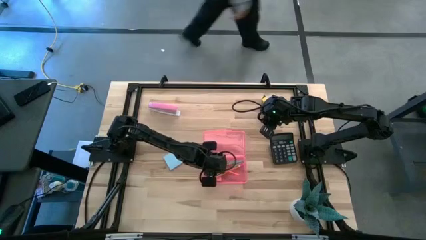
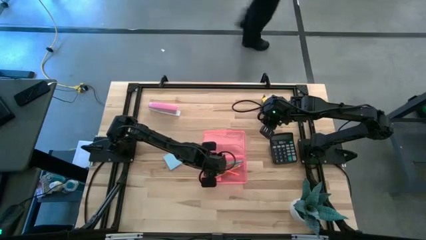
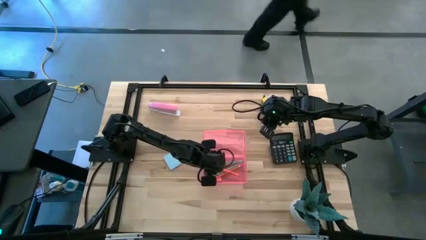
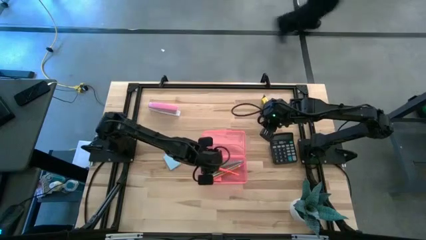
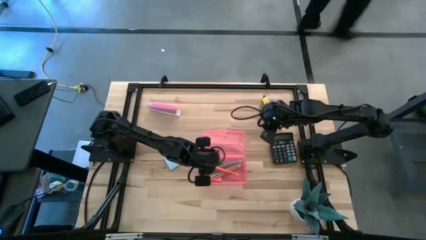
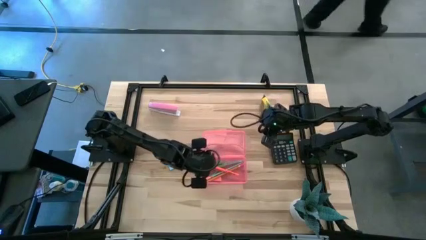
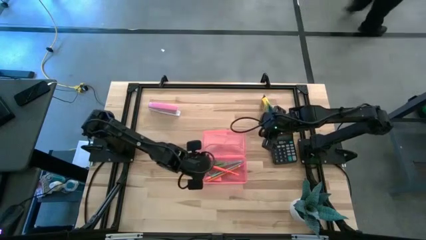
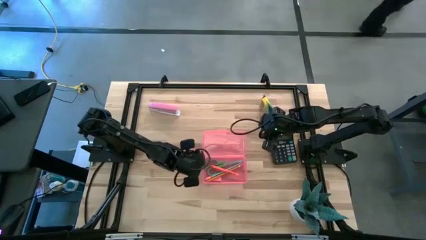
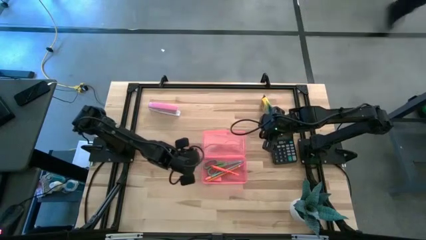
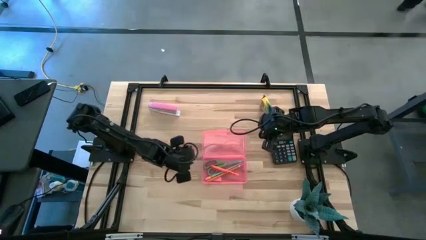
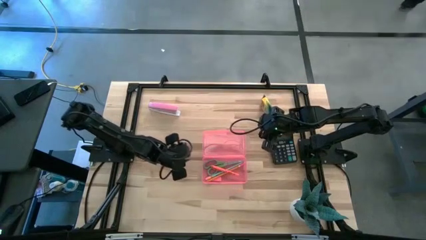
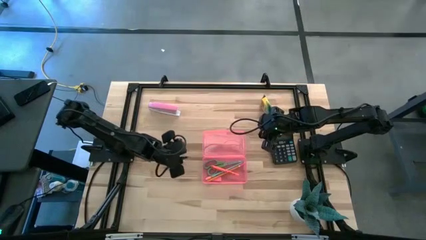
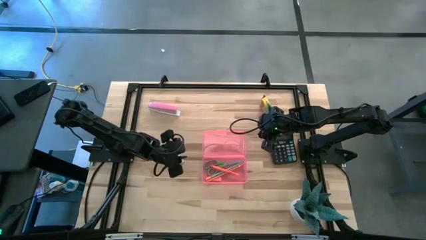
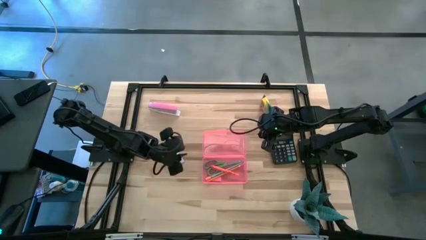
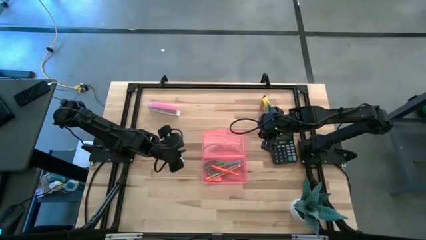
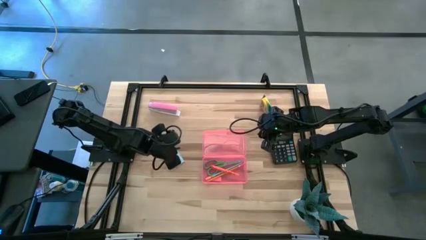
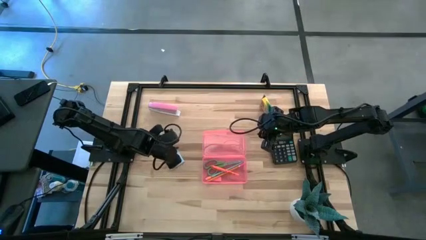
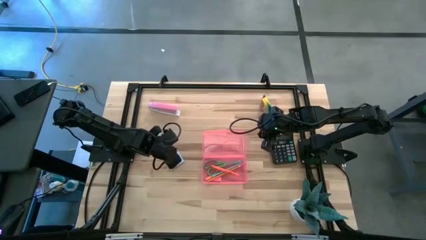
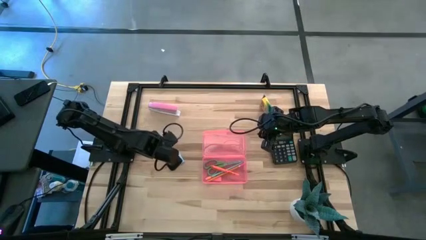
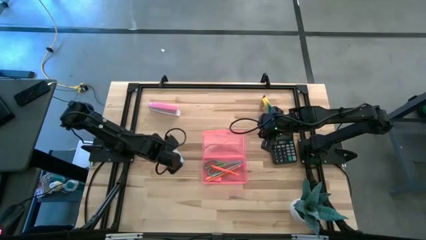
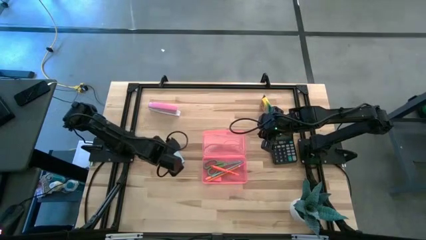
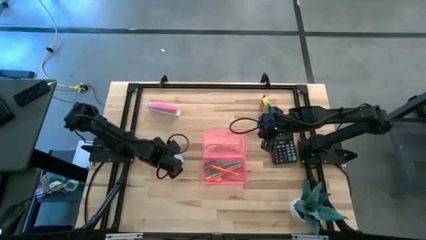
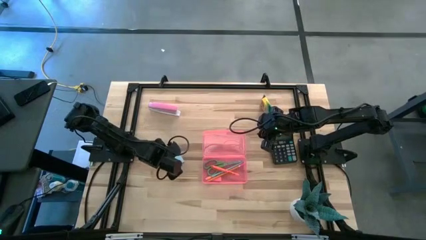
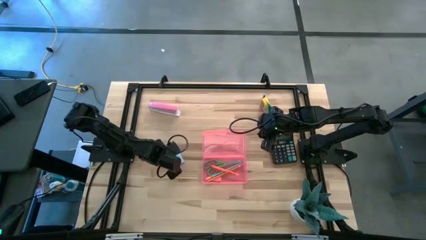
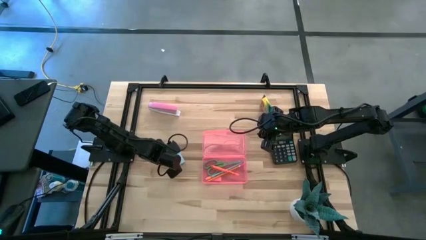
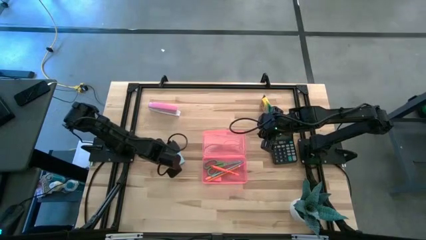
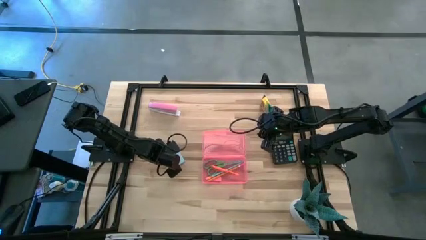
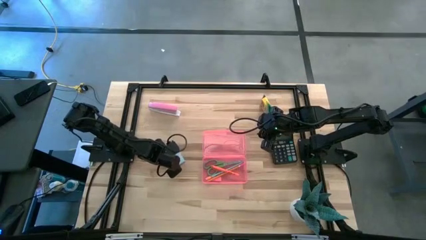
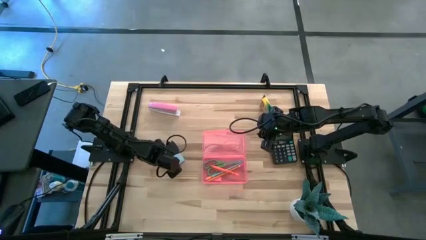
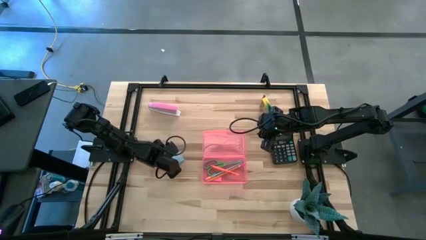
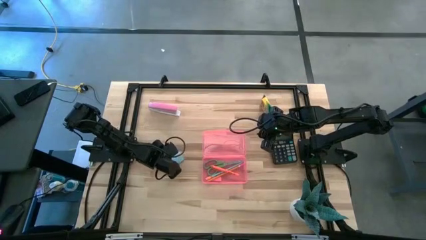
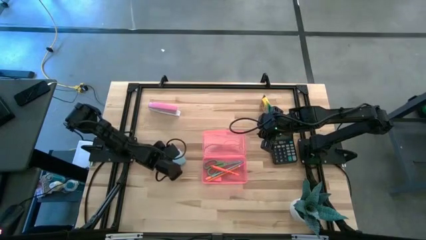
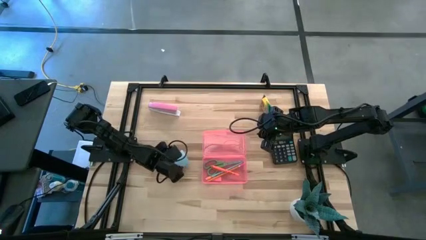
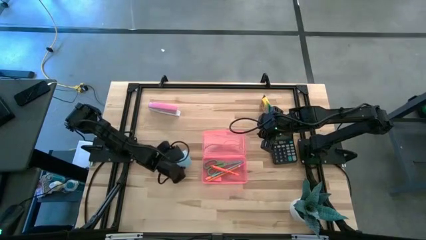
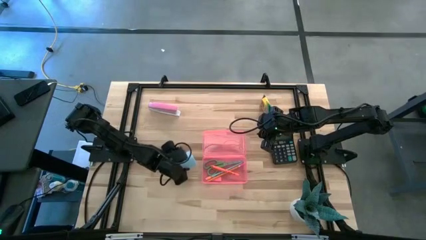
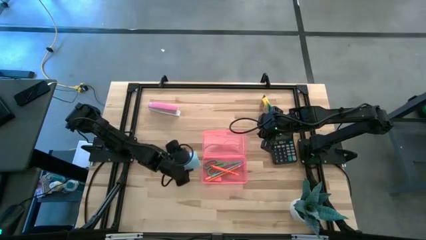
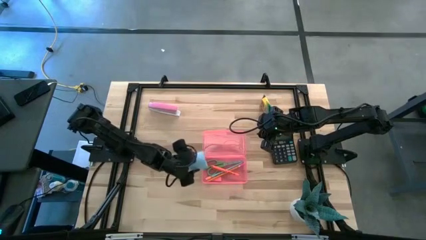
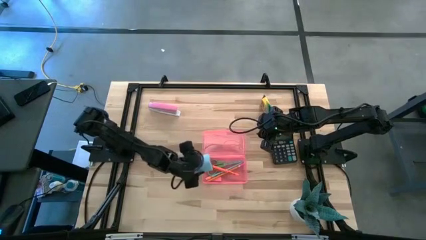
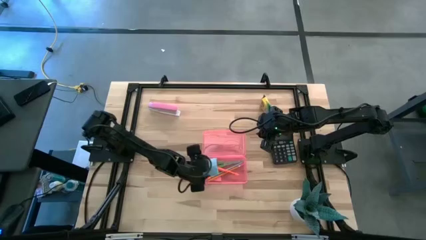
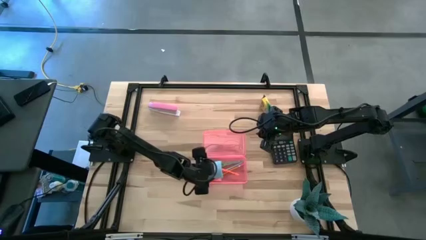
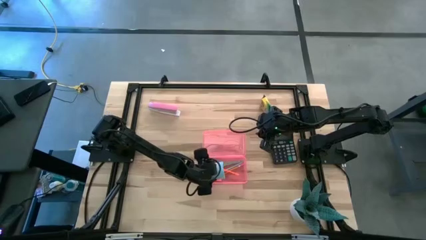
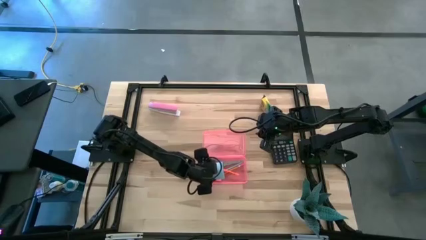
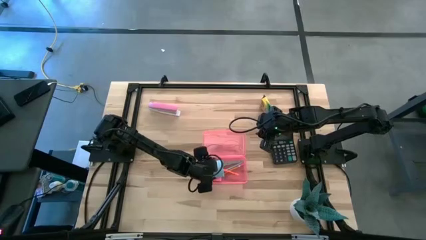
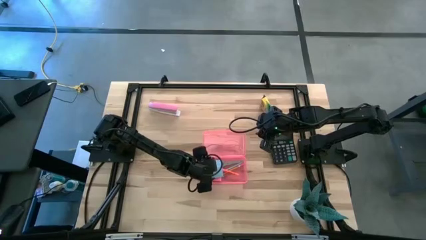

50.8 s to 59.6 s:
Task: Pack school essentials
Put the sticky note into the supply box

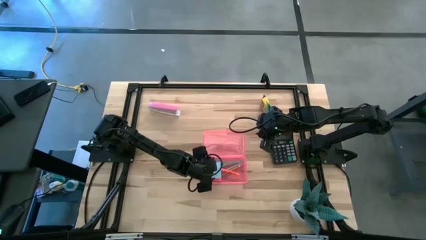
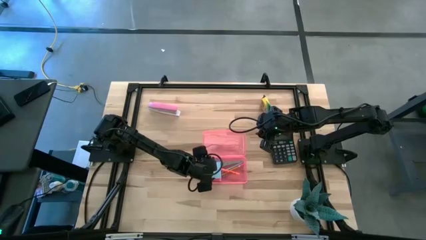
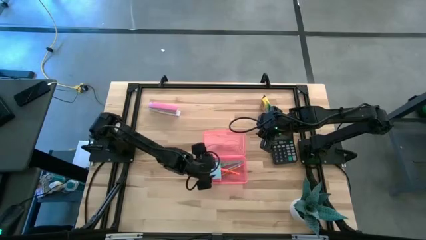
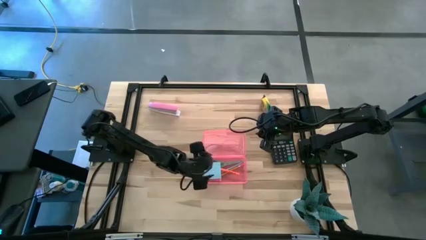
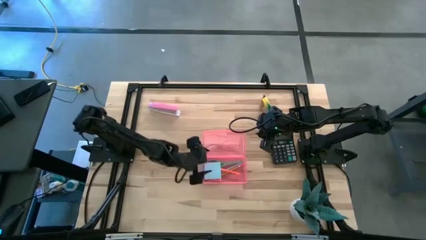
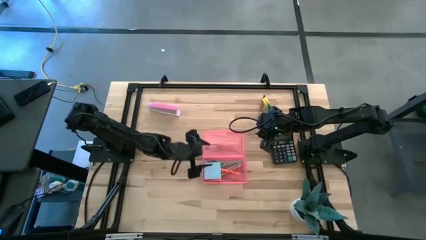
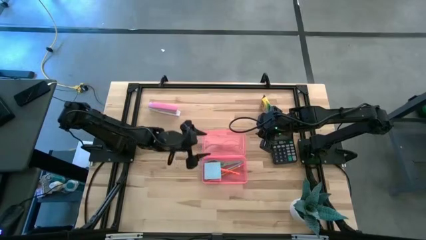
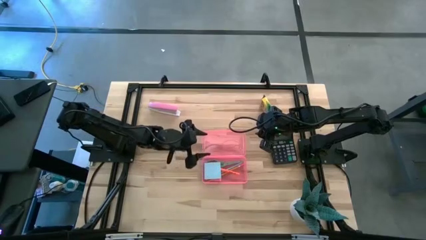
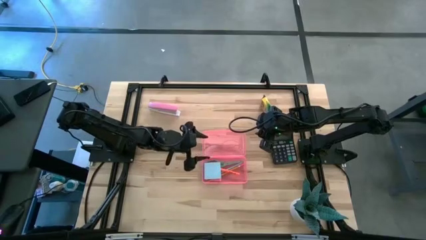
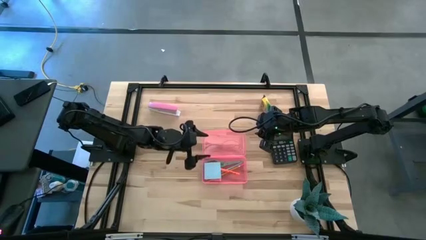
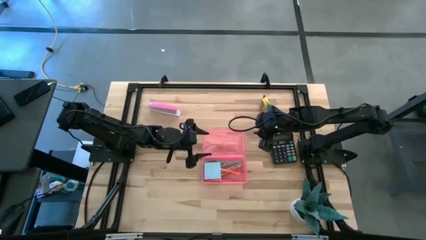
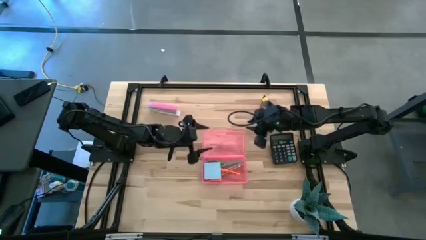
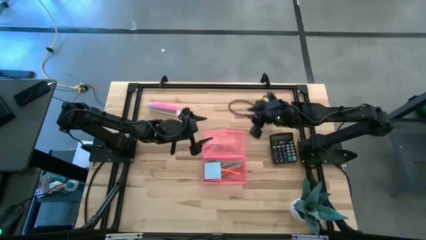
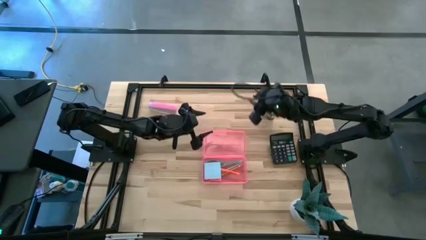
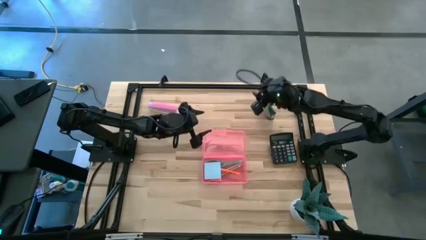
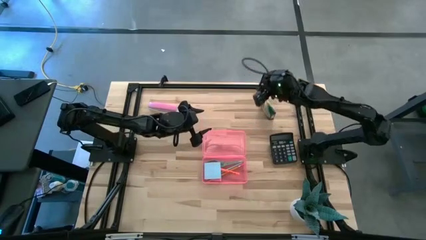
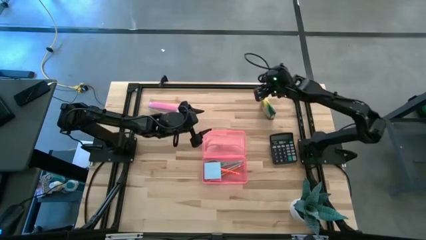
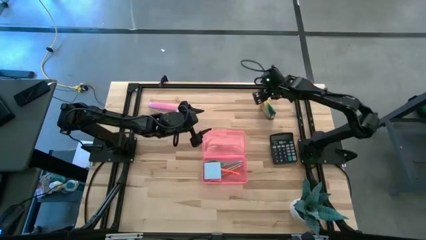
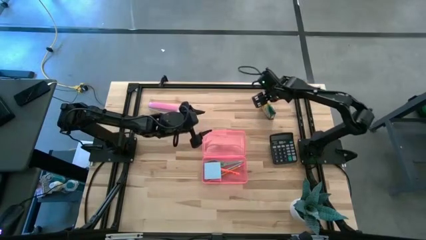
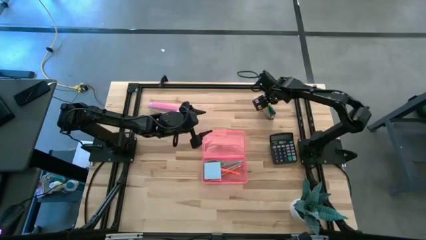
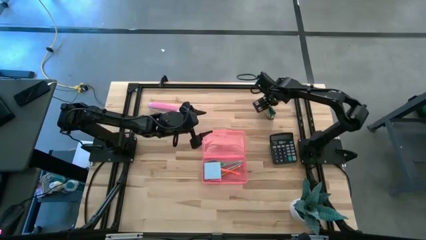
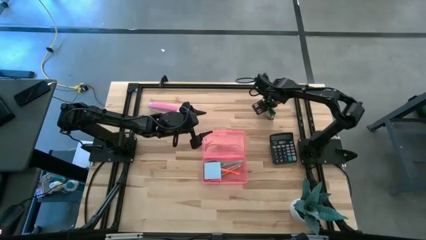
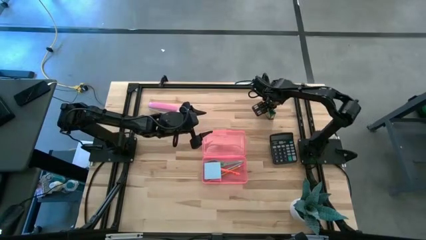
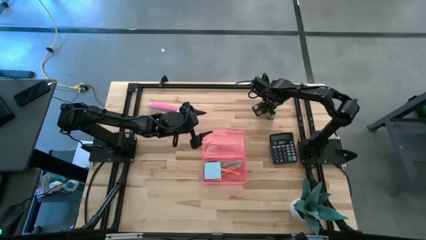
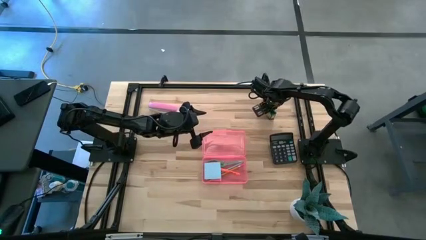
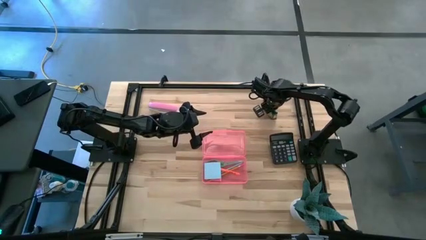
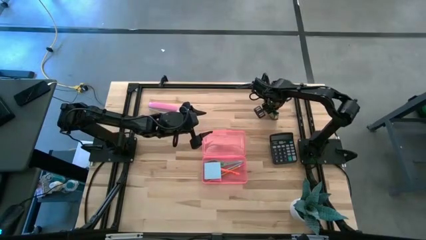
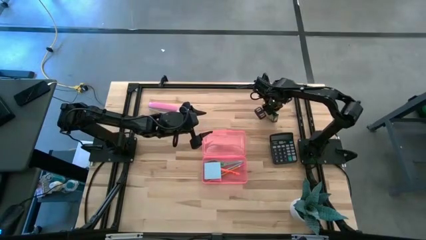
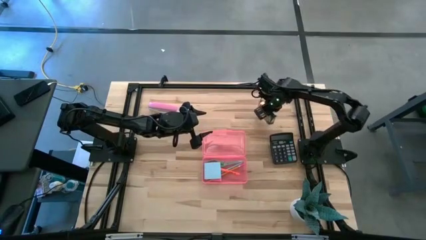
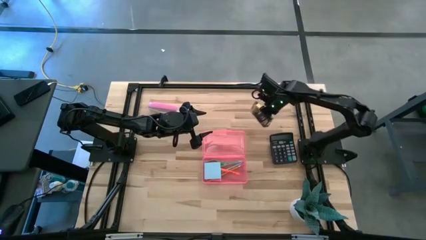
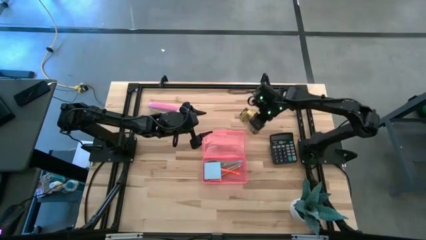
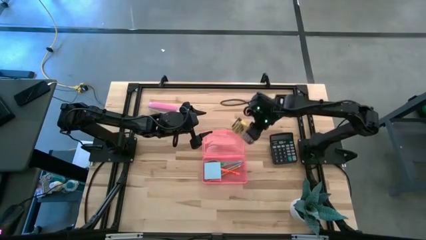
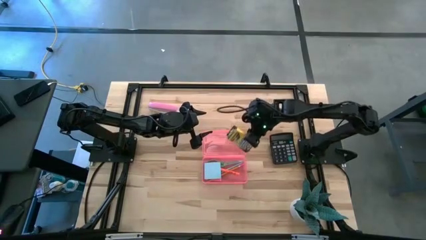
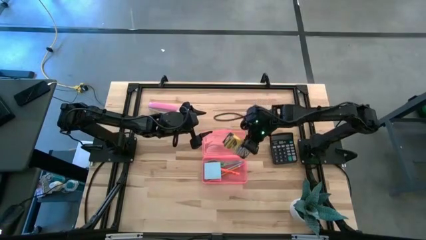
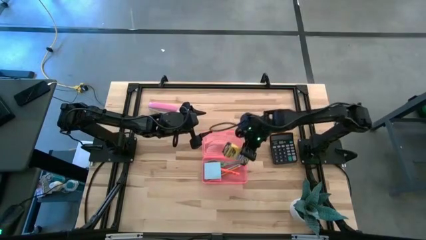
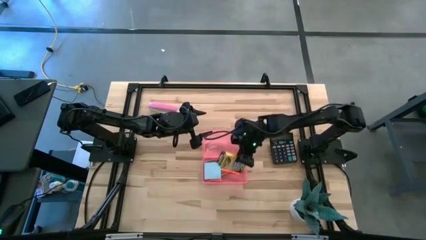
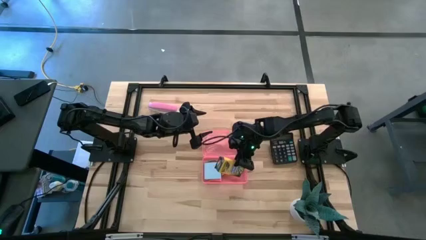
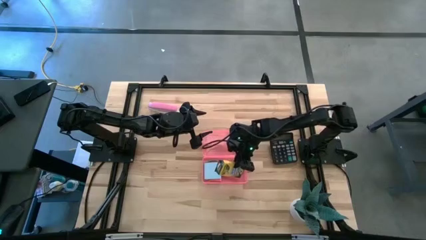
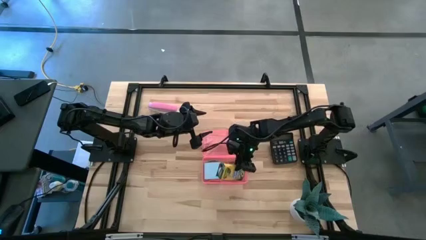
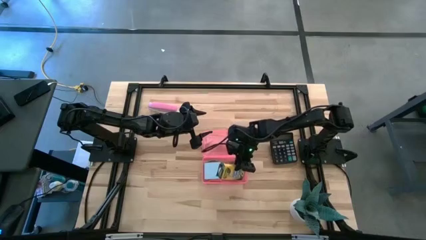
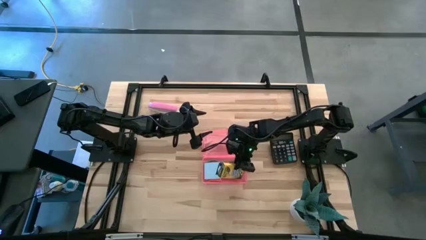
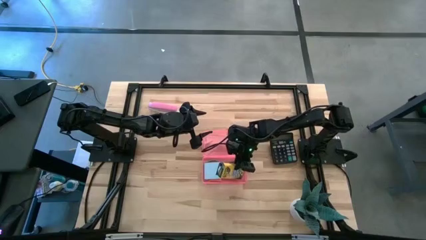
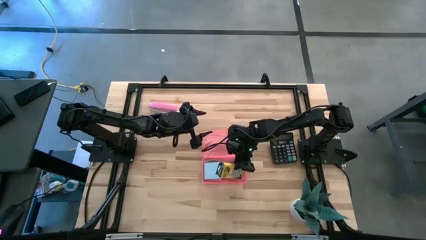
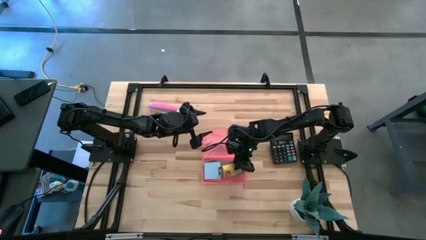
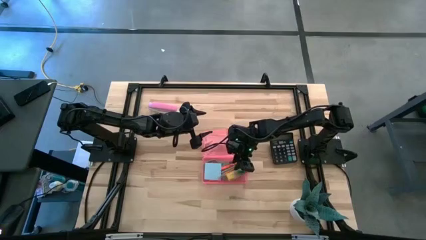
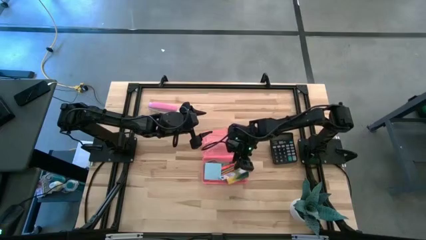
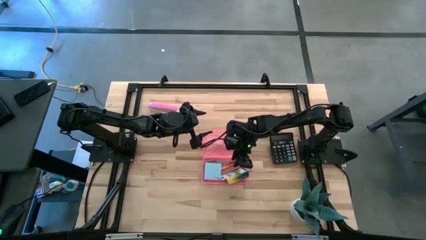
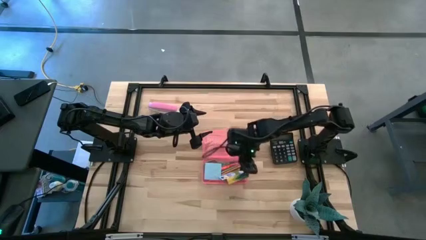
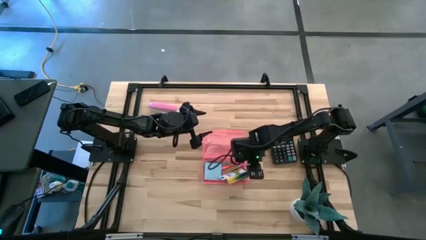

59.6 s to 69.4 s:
Put the crayon box into the supply box
